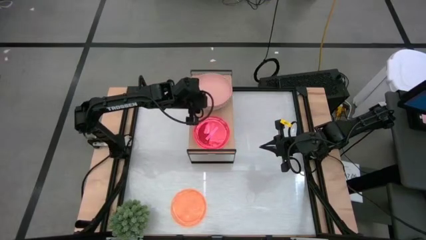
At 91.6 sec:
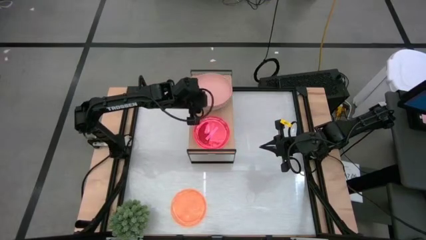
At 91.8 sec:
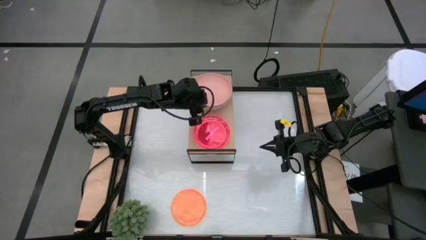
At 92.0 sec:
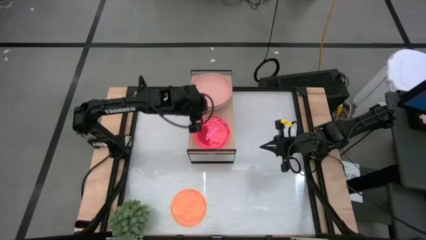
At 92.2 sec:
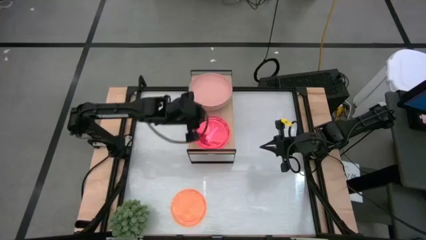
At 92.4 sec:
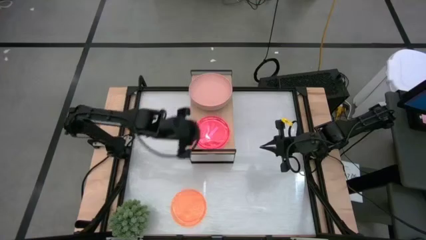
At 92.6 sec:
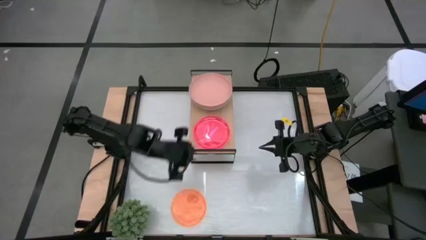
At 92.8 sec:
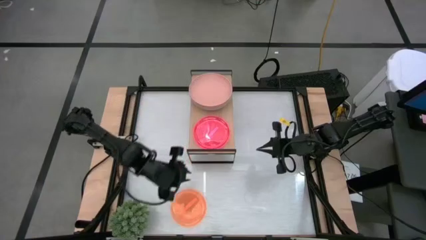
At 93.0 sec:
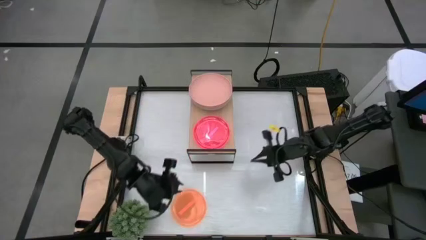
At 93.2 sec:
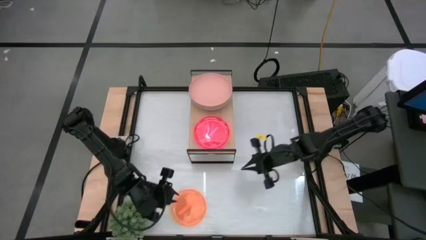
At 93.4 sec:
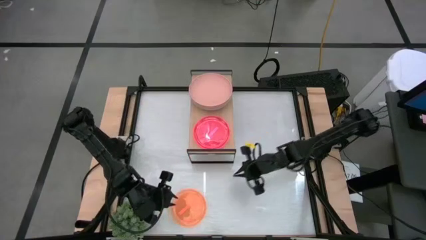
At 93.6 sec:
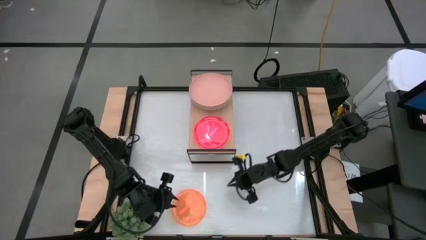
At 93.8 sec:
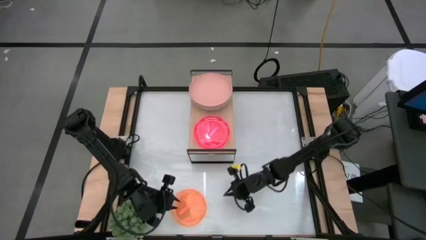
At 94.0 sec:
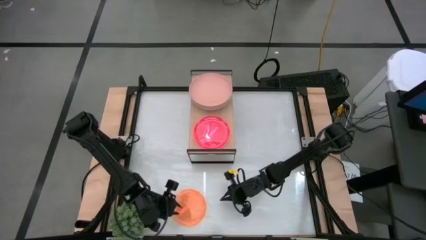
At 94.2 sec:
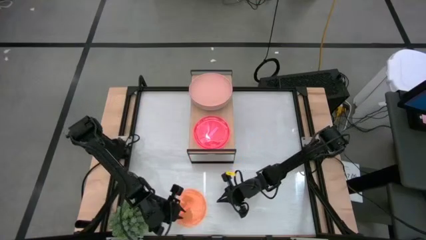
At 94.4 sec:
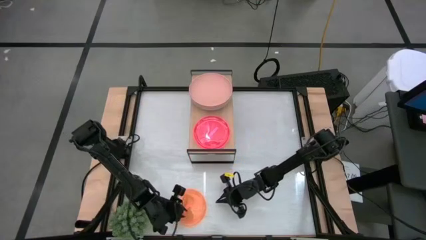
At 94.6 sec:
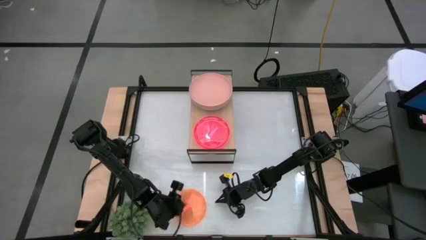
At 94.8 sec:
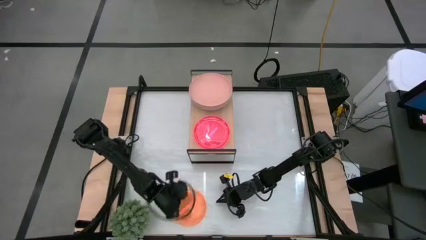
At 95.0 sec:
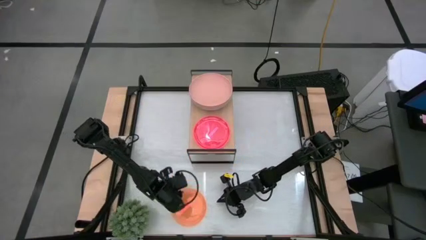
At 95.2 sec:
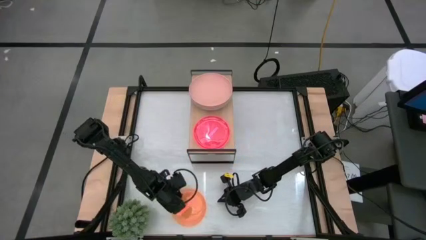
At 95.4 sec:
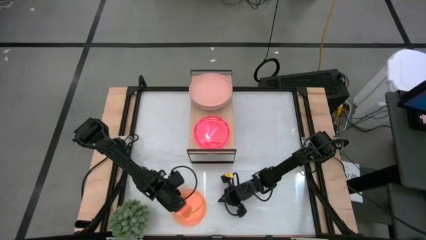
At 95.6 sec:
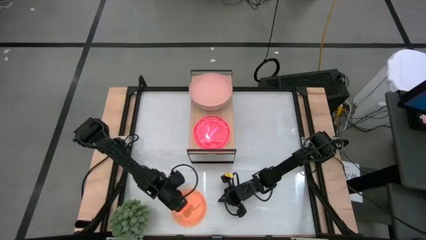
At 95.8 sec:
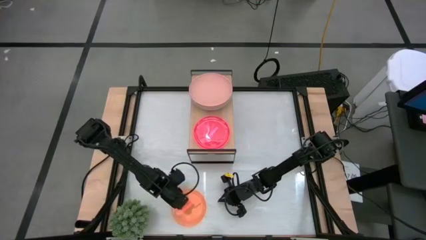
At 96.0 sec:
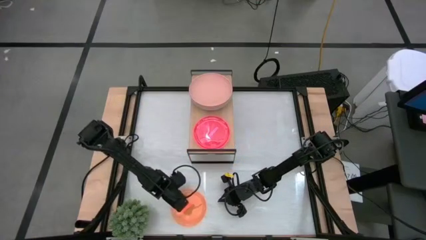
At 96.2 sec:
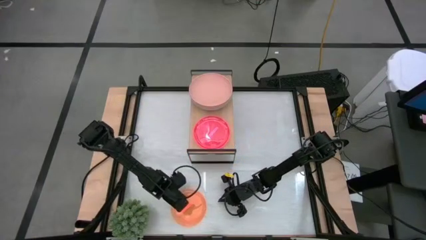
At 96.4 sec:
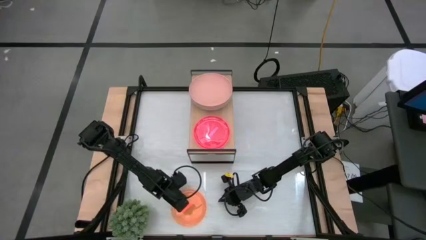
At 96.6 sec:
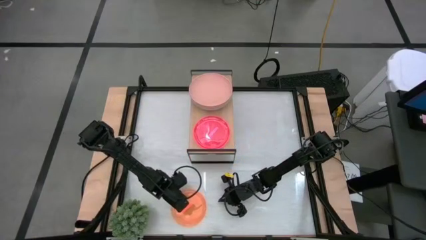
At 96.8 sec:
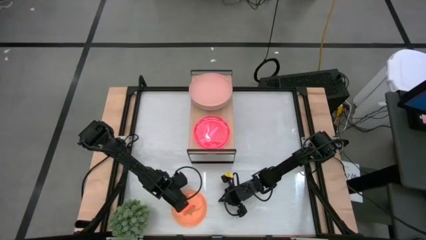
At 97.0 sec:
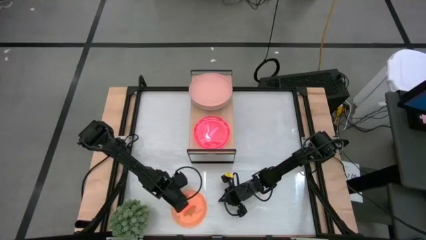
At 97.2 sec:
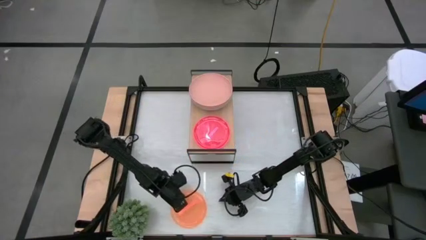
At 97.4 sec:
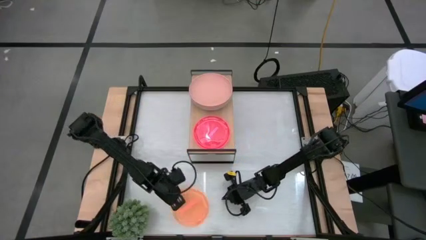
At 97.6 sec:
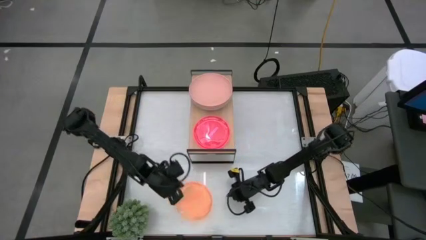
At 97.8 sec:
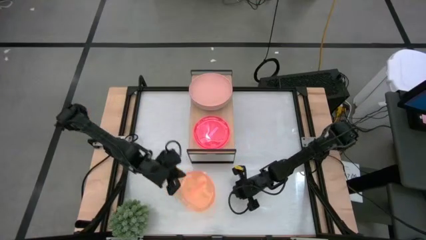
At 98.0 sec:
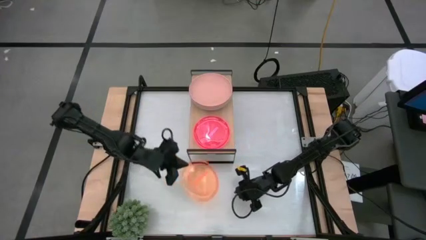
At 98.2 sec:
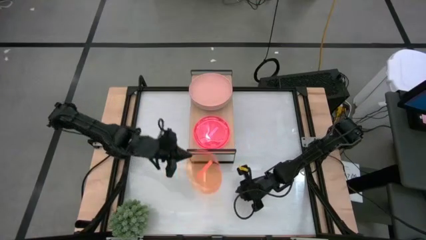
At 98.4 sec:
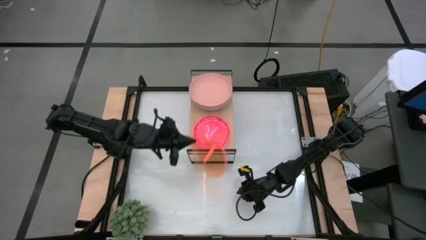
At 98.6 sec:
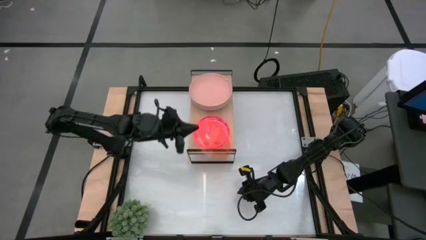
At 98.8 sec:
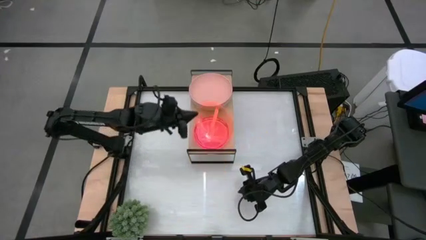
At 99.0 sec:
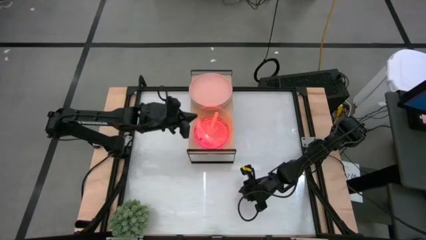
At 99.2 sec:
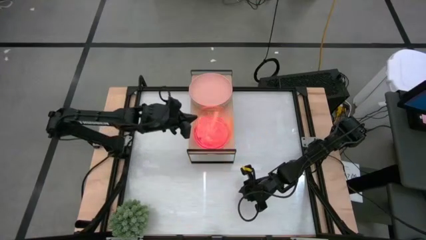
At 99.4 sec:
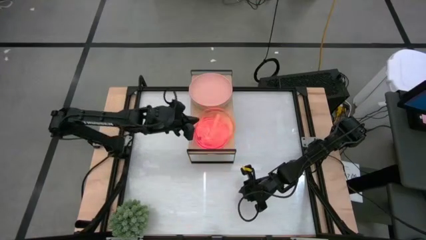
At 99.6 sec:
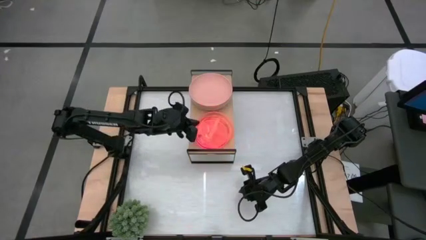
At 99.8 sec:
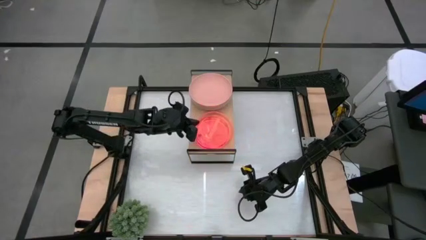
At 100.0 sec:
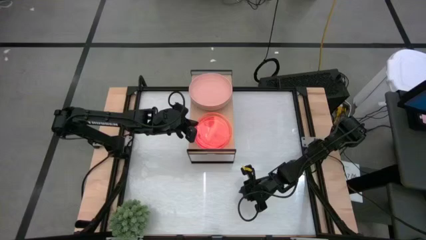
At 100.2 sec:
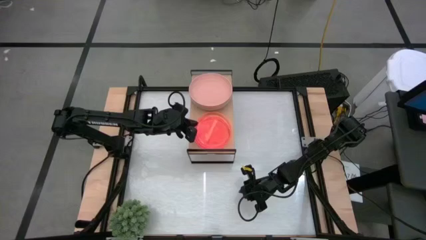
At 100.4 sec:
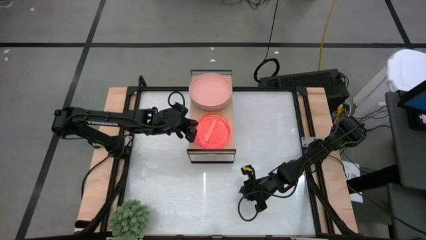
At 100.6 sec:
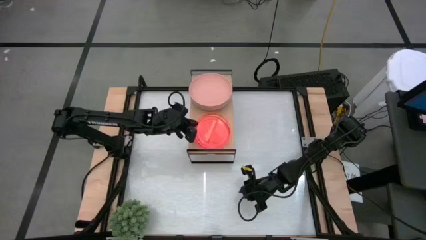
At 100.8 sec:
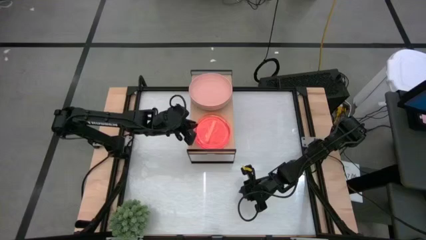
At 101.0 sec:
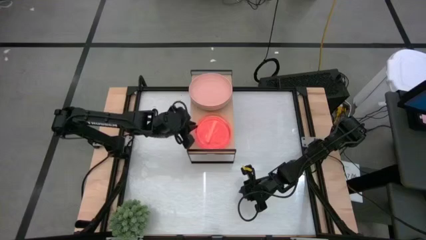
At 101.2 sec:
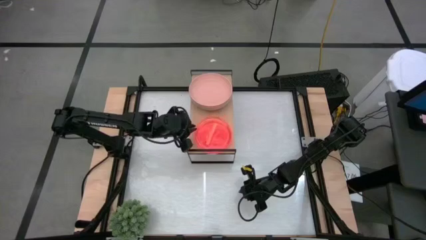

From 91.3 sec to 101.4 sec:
Task: Place and stack plates onto a shelf
Stack the orange plate on top of the pink plate on the shelf
